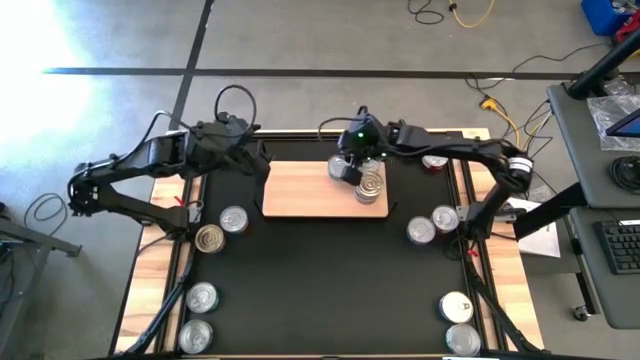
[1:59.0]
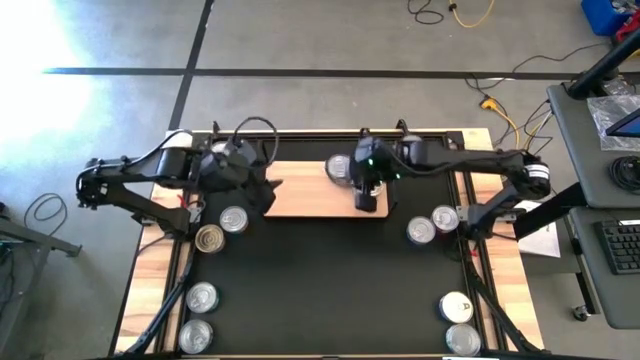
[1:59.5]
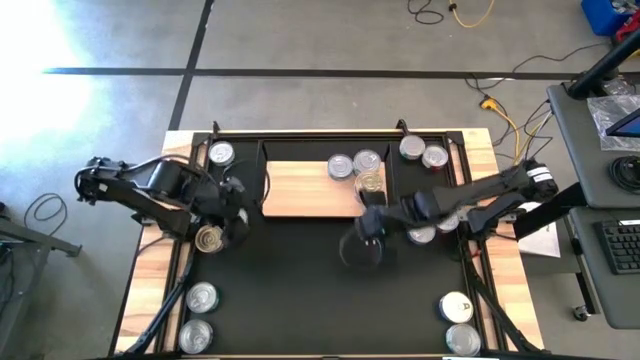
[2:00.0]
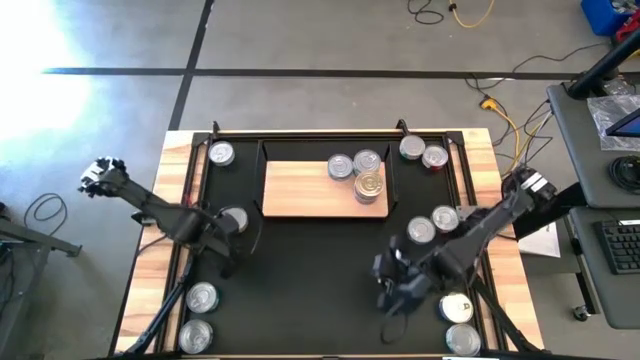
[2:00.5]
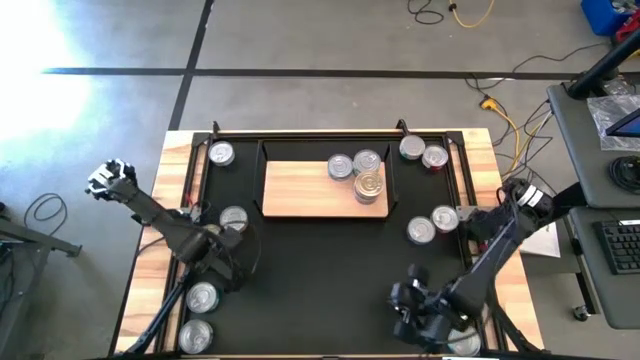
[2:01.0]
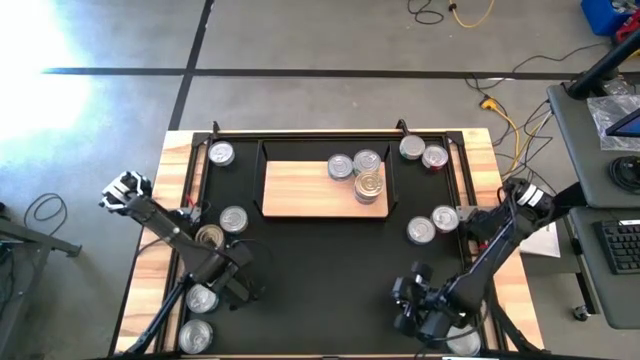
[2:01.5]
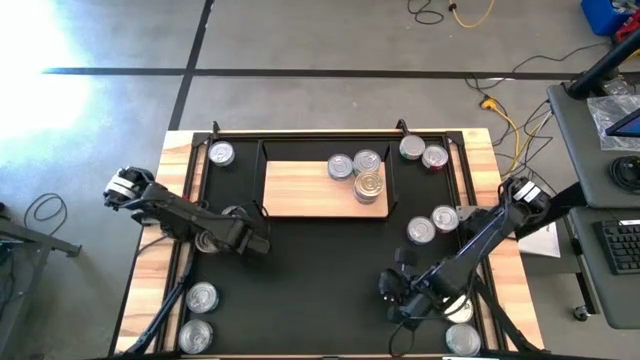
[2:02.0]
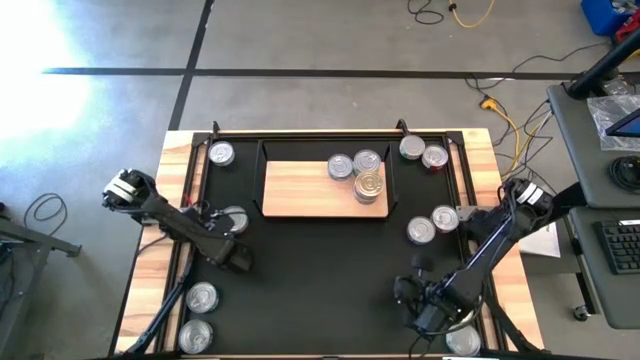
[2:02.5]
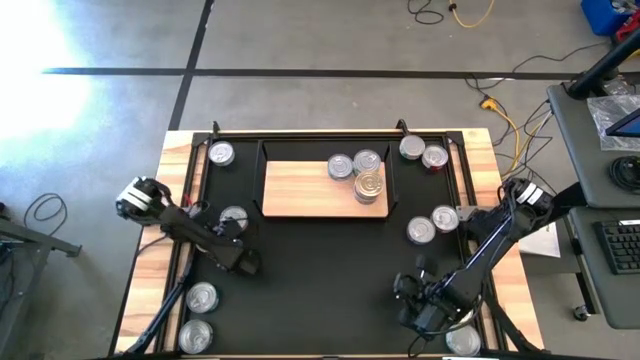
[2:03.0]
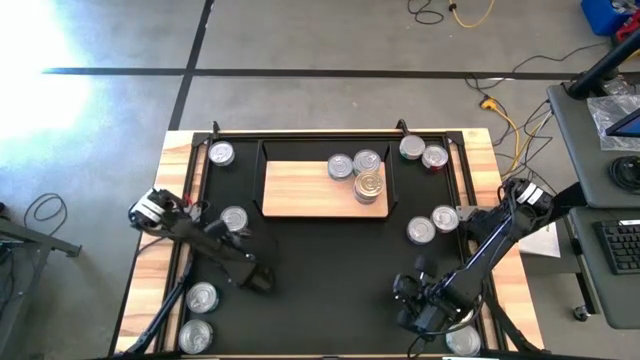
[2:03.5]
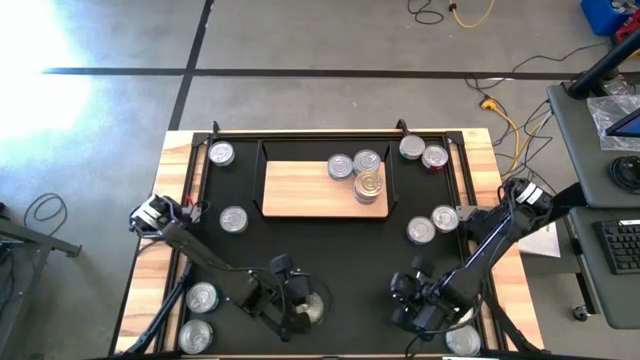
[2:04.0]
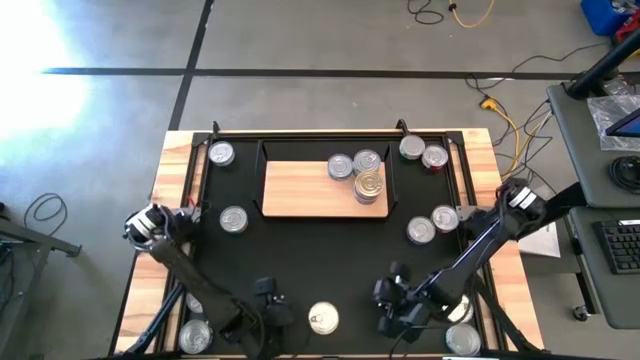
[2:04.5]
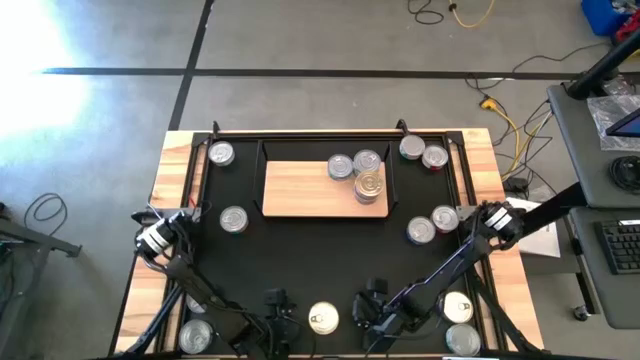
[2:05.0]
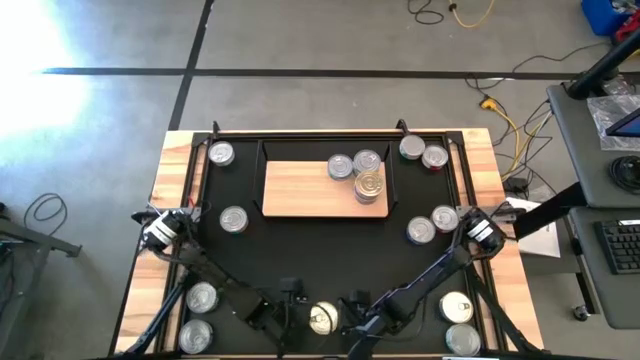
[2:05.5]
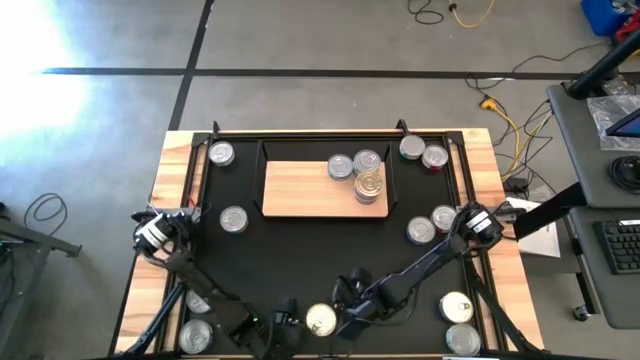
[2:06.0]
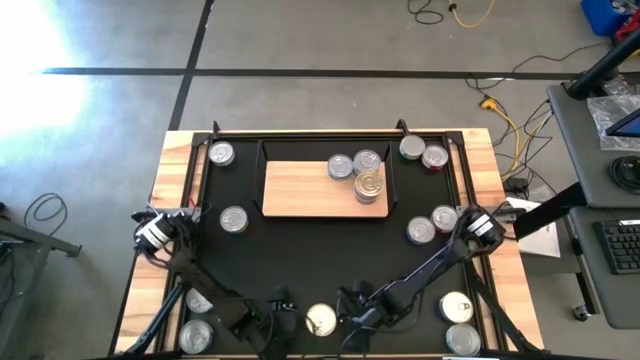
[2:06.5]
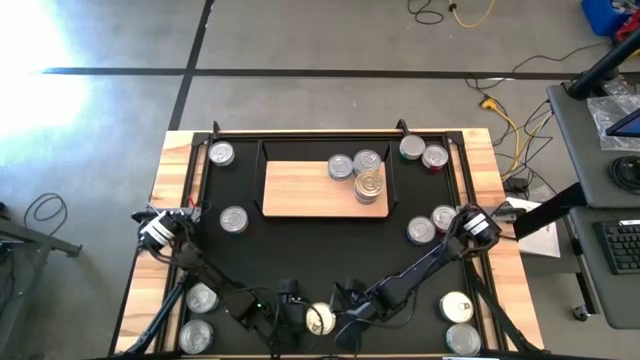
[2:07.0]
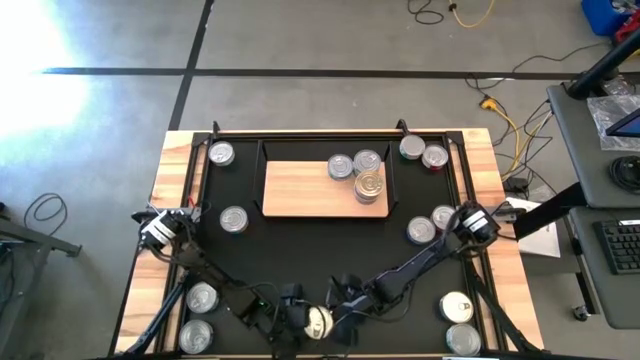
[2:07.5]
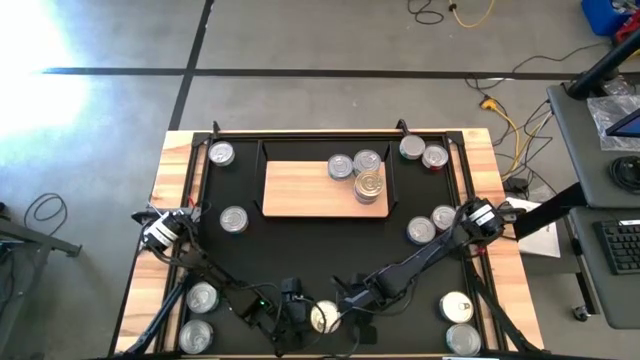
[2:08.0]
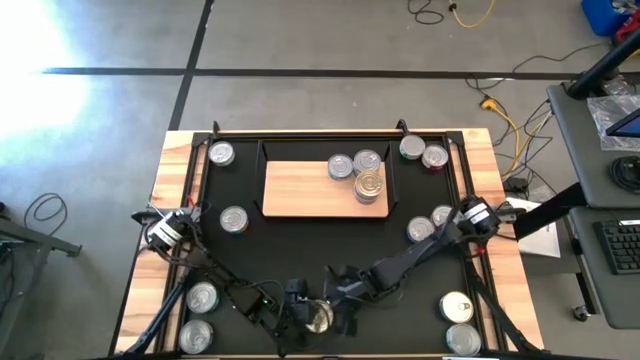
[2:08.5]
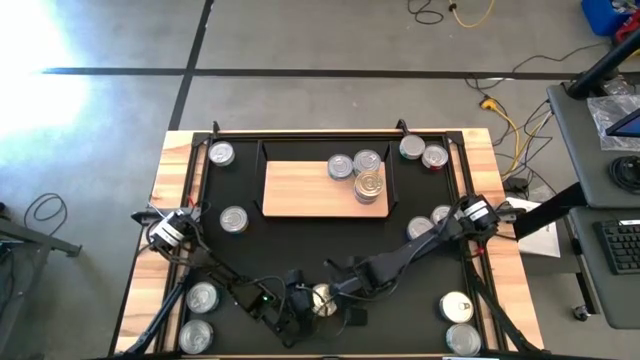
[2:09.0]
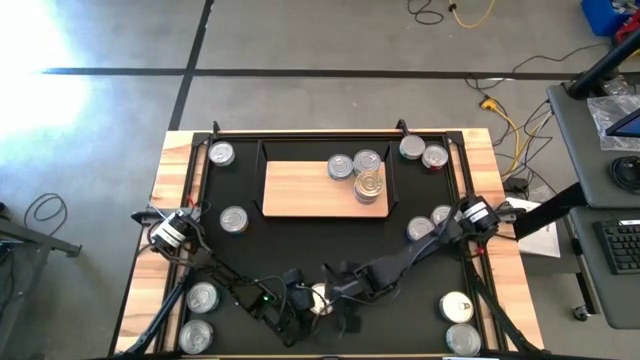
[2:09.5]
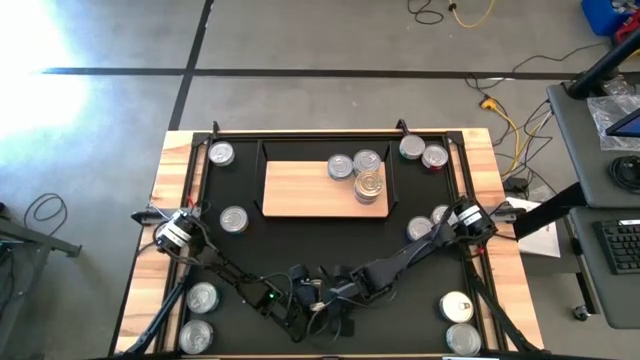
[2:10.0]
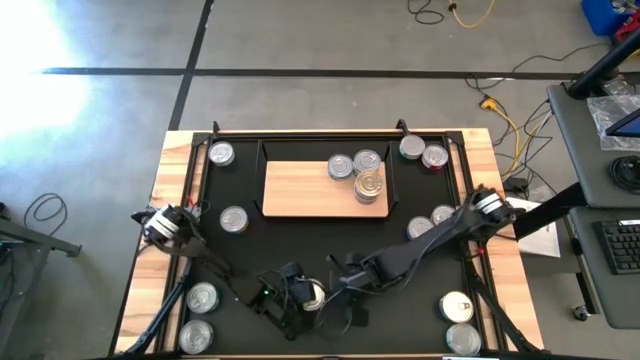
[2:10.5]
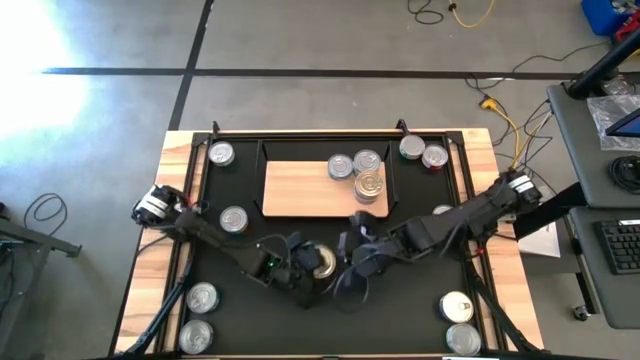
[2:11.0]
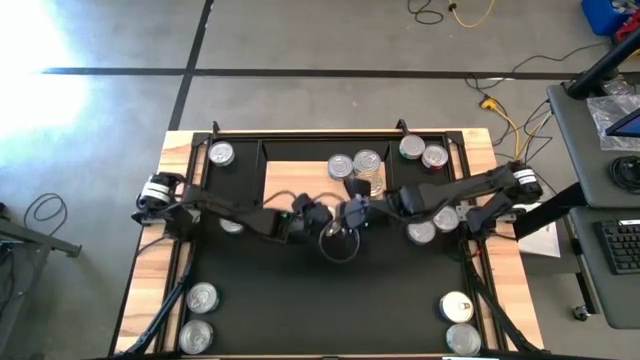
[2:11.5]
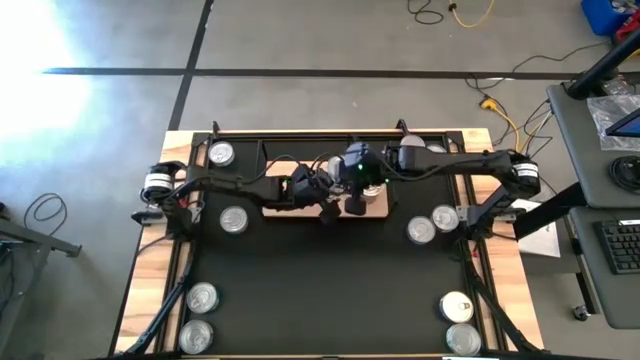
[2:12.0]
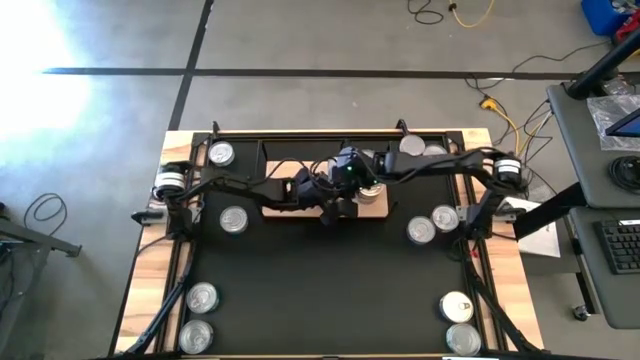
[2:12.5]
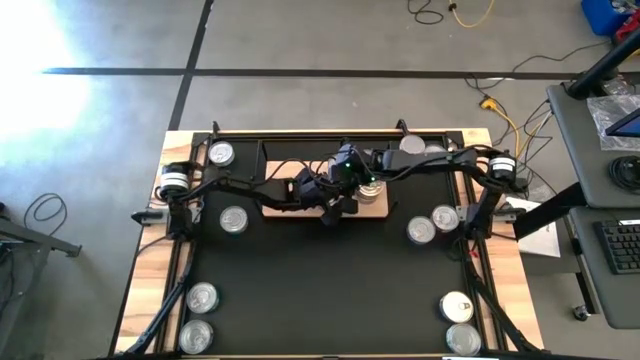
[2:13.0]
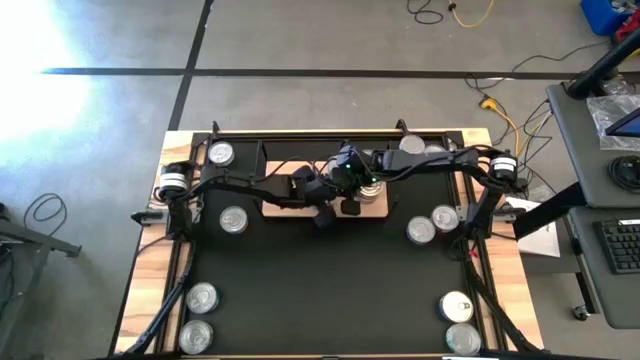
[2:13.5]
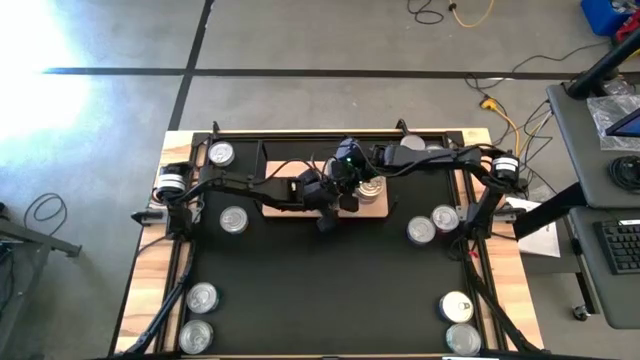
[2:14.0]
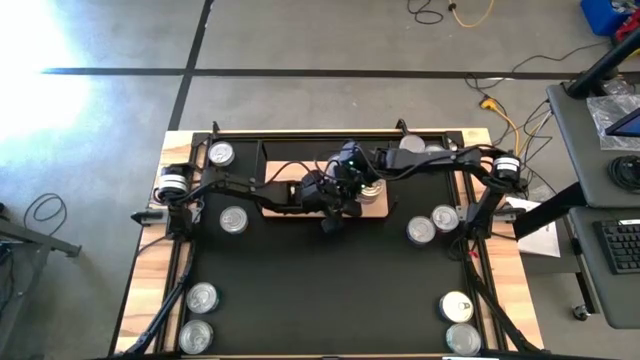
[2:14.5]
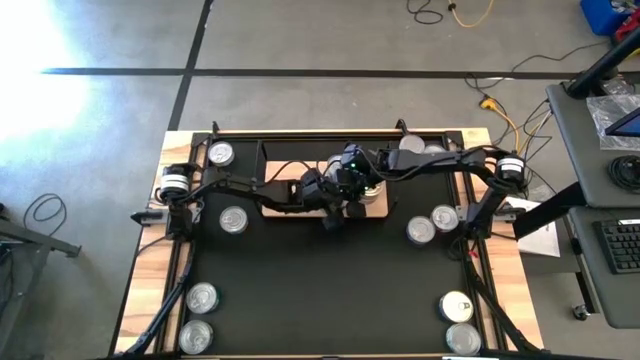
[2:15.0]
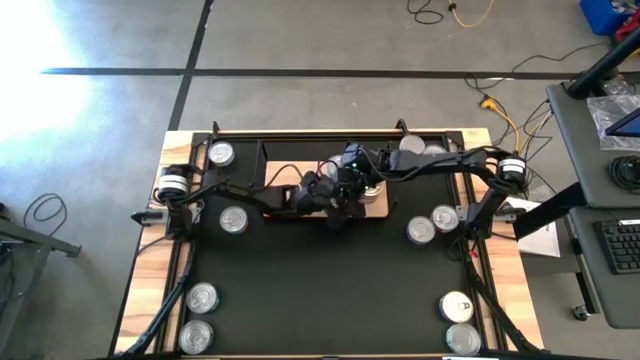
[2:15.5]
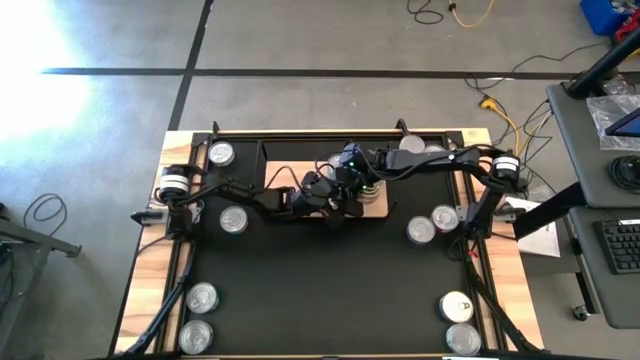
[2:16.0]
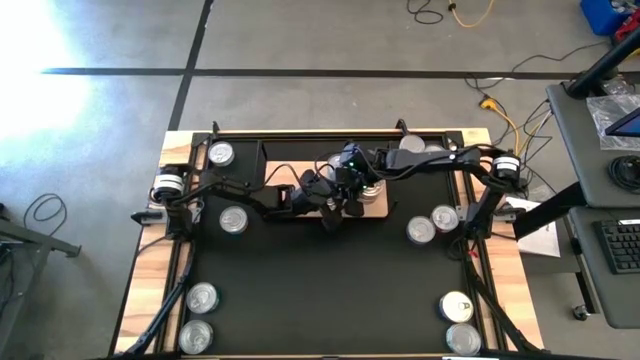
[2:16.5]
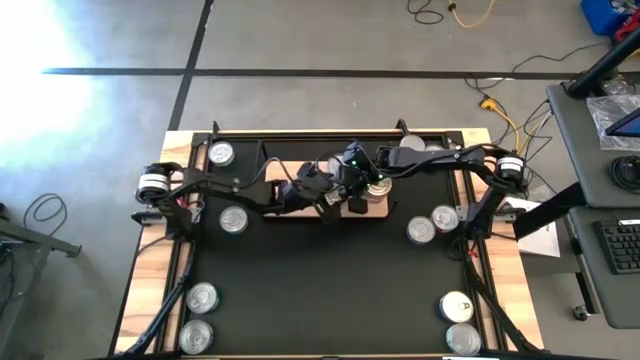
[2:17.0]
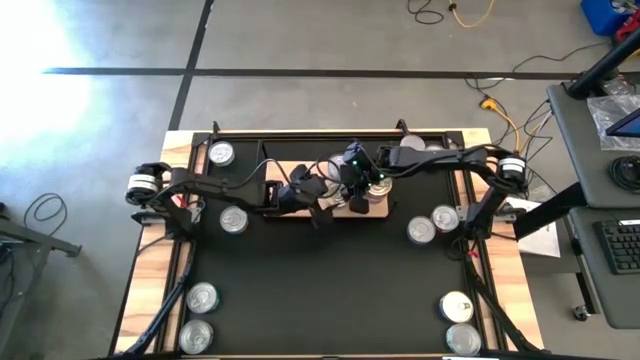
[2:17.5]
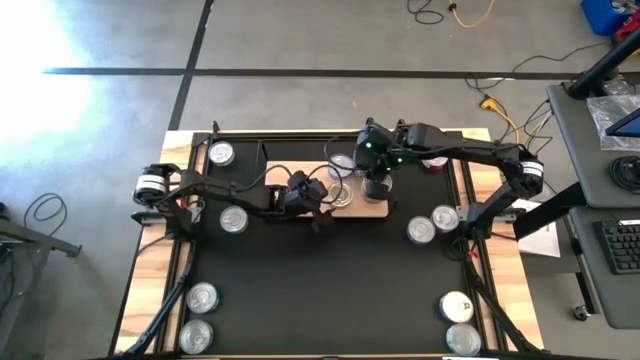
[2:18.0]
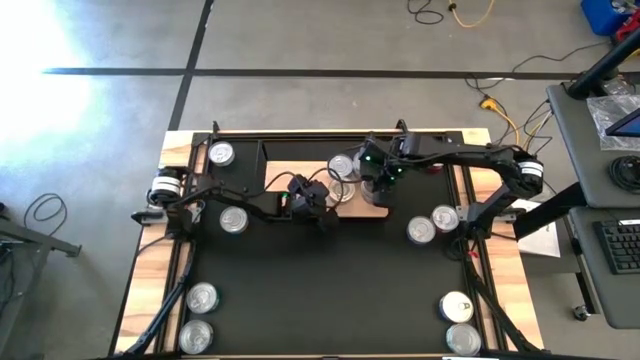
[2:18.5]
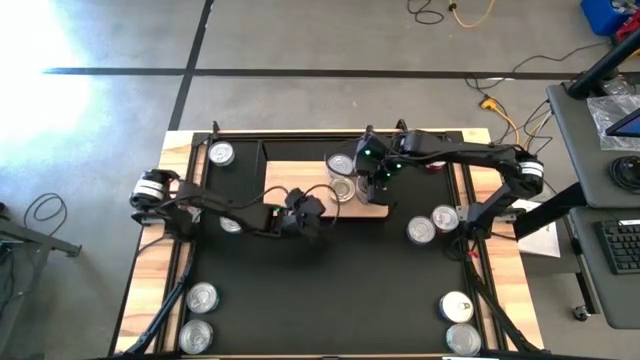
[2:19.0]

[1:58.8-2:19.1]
Task: Stack canned seafood by type on shelf
Put the middle left blue and orange tuna can on the shelf

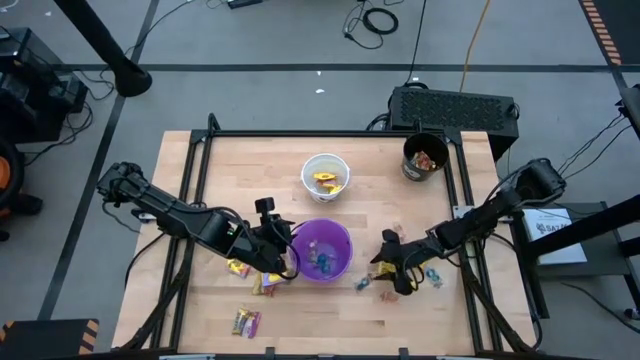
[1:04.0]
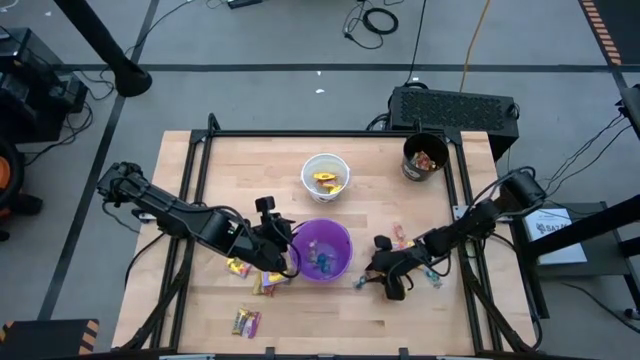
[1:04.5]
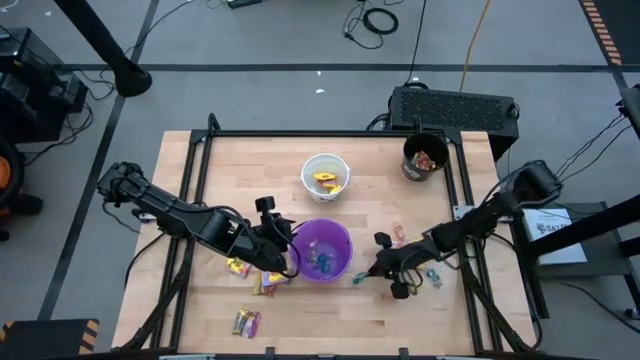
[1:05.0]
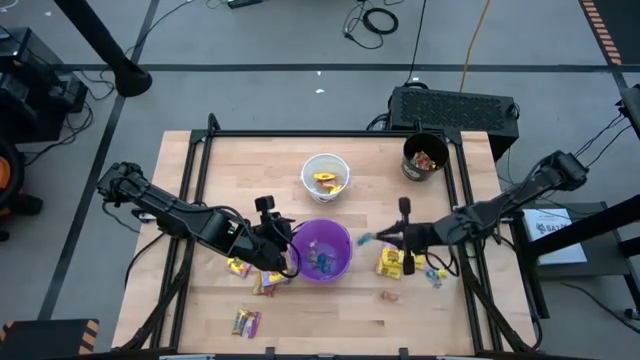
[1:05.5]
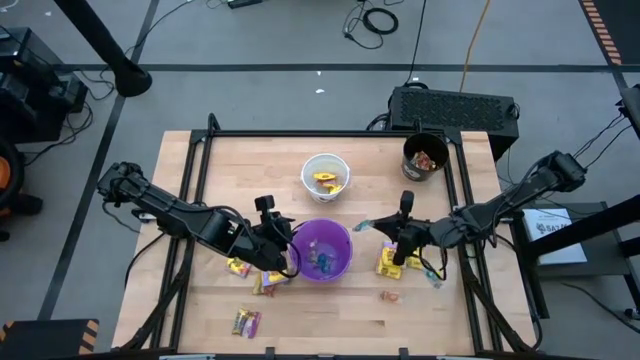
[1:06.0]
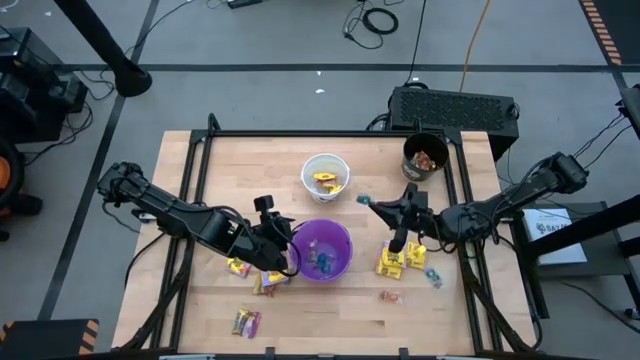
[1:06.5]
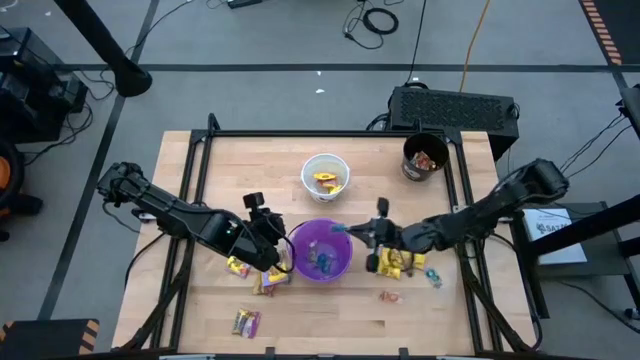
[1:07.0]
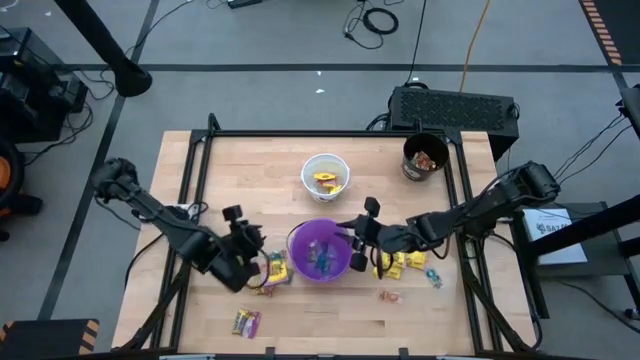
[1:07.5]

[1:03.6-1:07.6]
Task: Sort candy by brand, put in halloween buckets
Put the blue candy into the violet bucket
